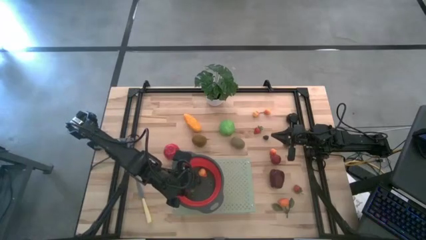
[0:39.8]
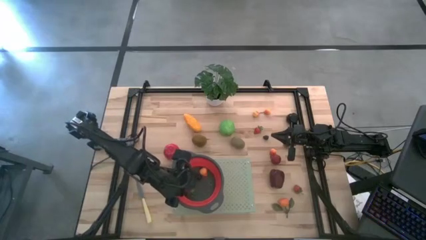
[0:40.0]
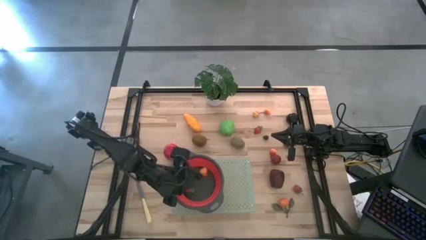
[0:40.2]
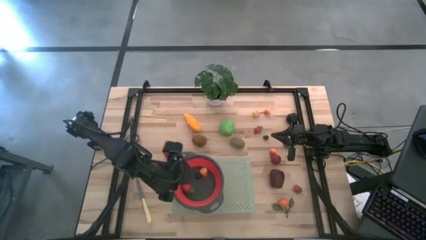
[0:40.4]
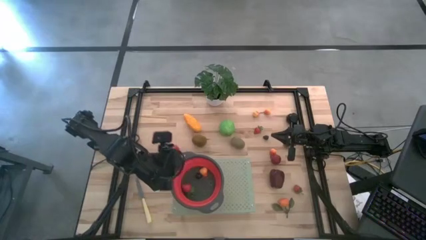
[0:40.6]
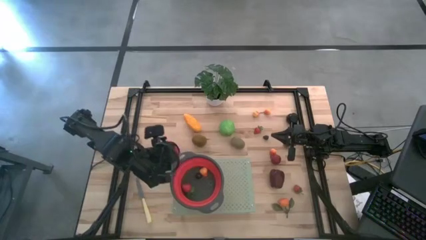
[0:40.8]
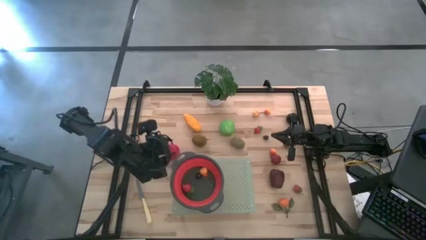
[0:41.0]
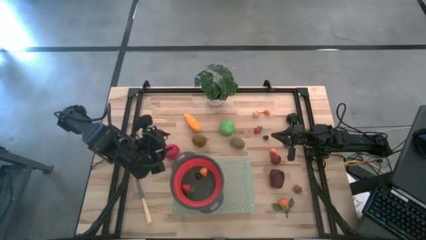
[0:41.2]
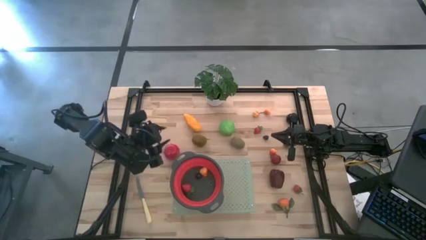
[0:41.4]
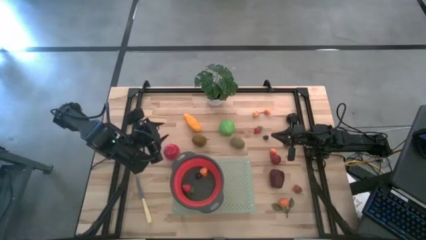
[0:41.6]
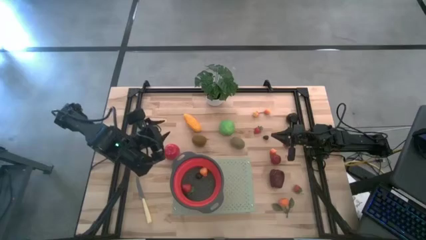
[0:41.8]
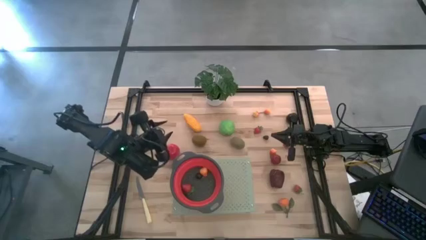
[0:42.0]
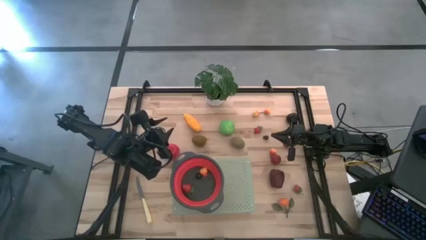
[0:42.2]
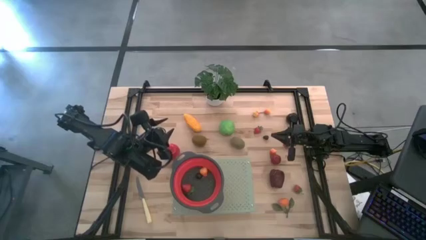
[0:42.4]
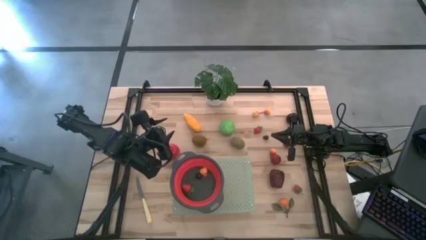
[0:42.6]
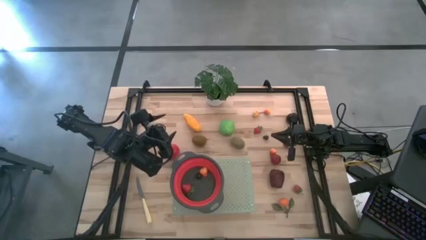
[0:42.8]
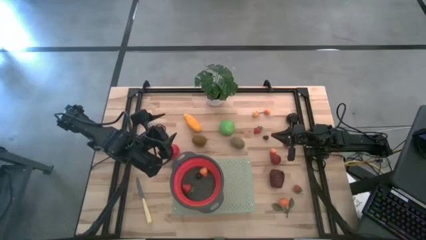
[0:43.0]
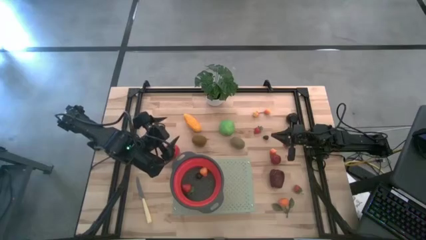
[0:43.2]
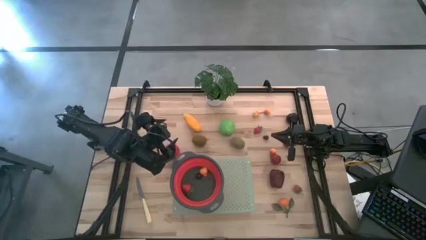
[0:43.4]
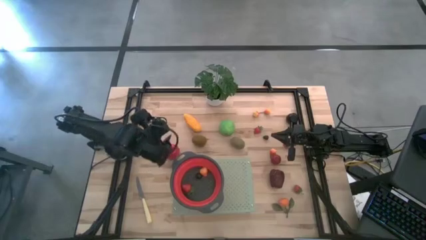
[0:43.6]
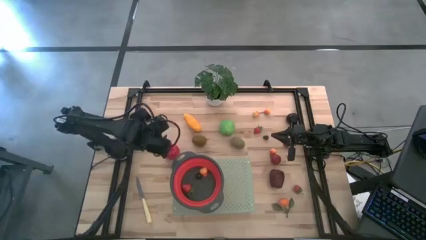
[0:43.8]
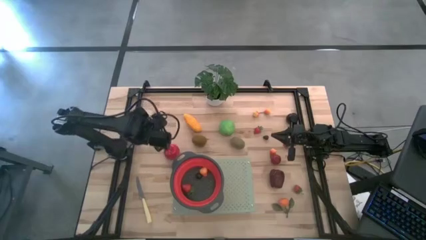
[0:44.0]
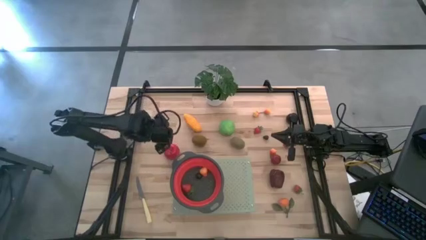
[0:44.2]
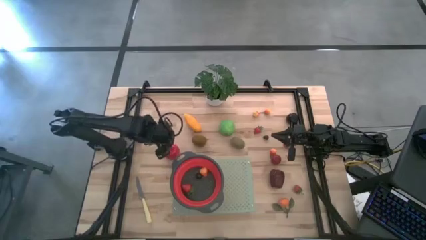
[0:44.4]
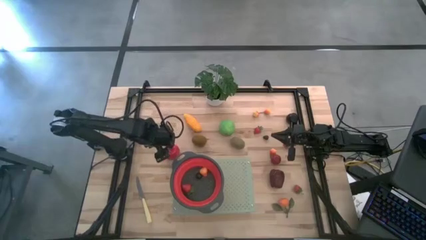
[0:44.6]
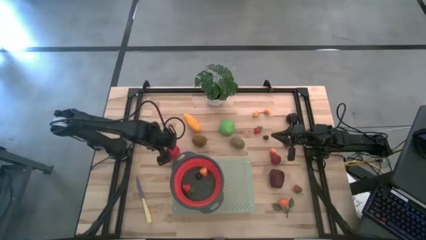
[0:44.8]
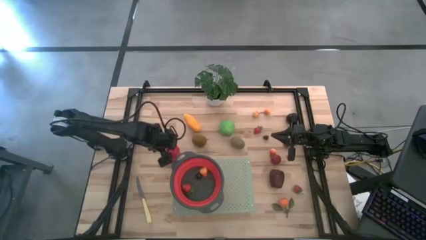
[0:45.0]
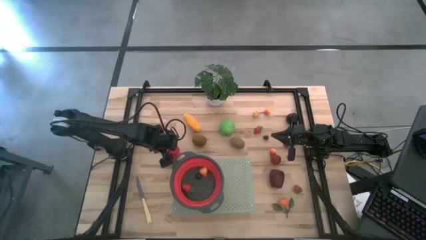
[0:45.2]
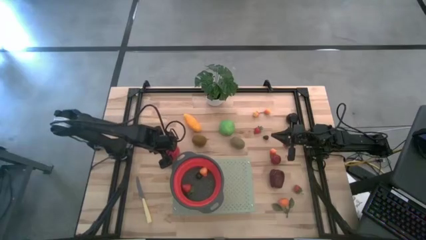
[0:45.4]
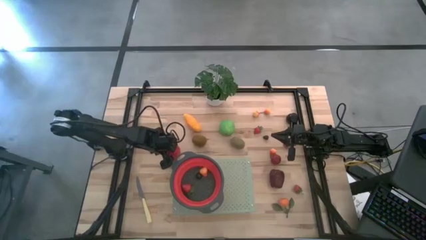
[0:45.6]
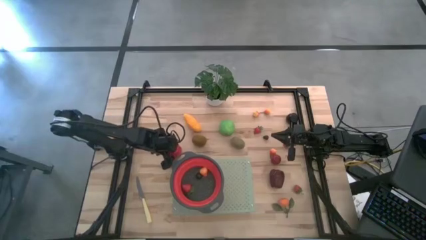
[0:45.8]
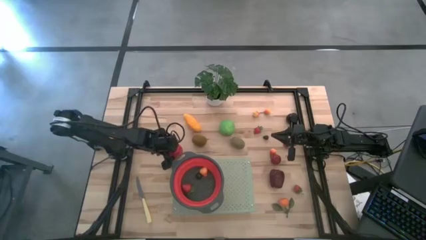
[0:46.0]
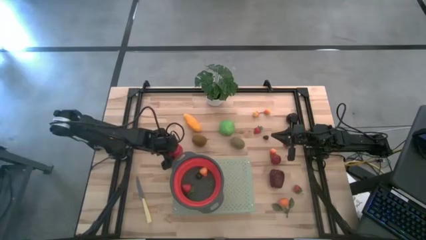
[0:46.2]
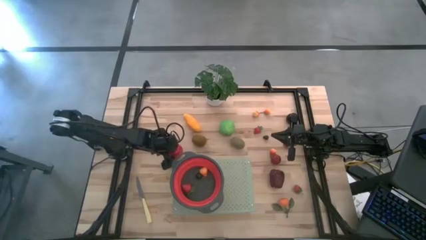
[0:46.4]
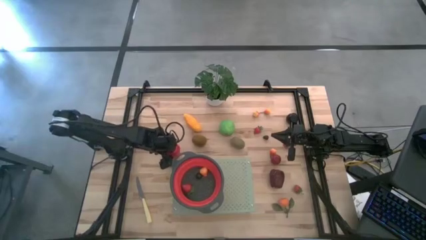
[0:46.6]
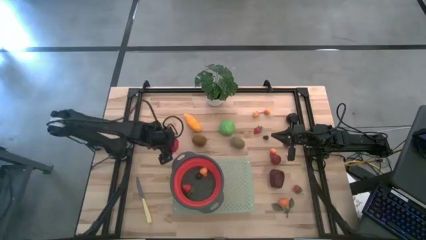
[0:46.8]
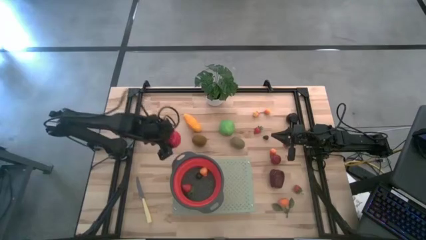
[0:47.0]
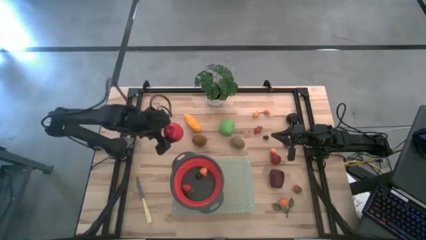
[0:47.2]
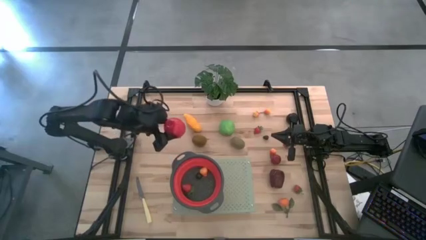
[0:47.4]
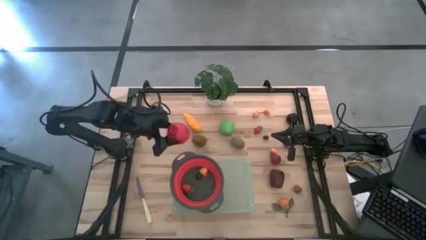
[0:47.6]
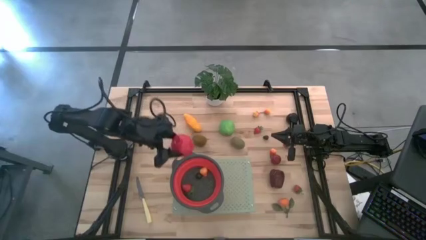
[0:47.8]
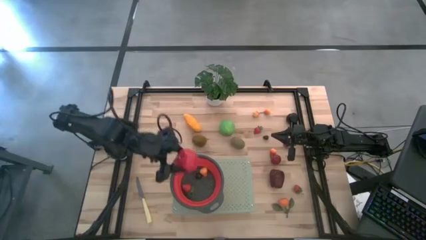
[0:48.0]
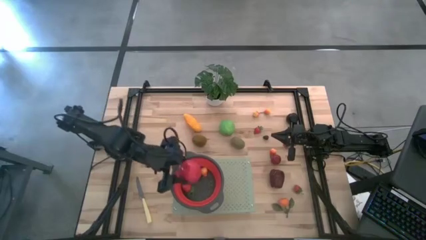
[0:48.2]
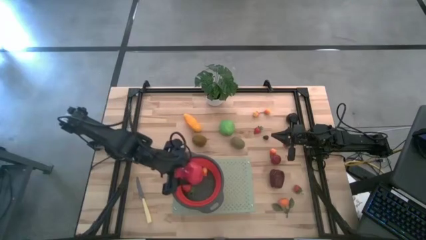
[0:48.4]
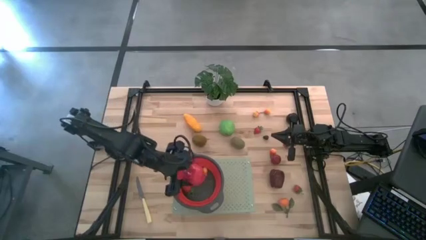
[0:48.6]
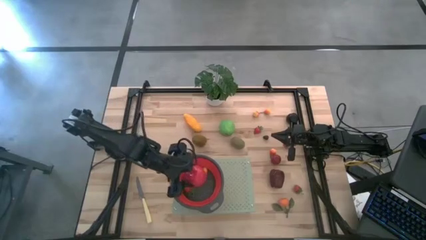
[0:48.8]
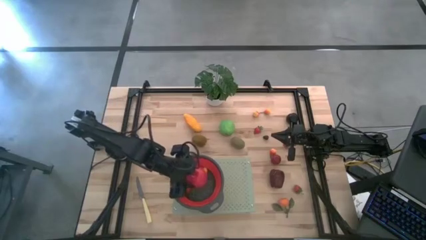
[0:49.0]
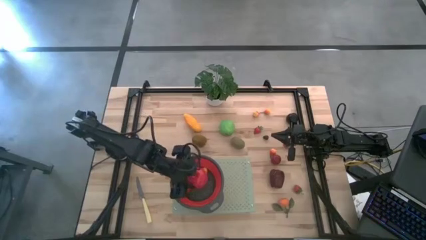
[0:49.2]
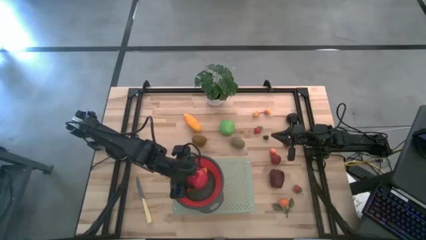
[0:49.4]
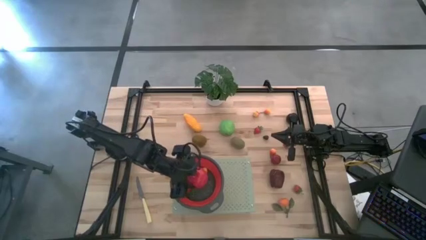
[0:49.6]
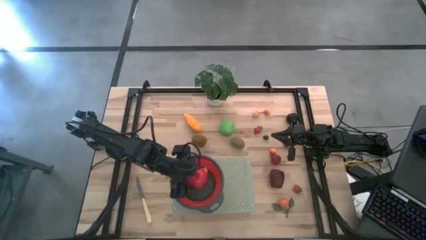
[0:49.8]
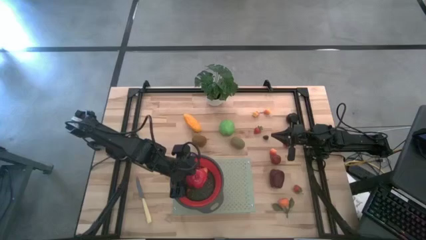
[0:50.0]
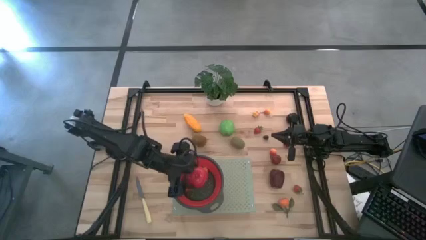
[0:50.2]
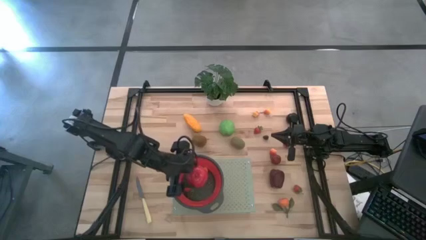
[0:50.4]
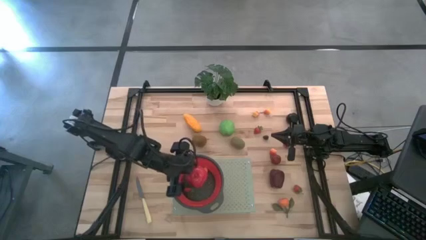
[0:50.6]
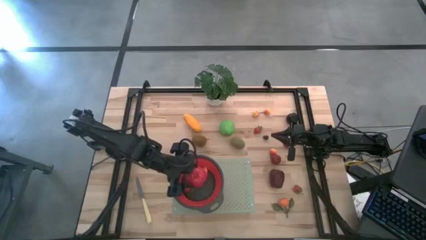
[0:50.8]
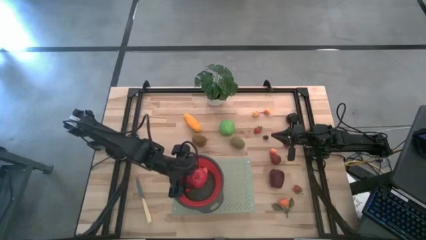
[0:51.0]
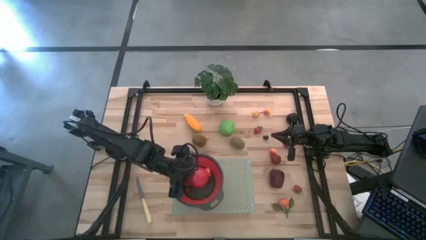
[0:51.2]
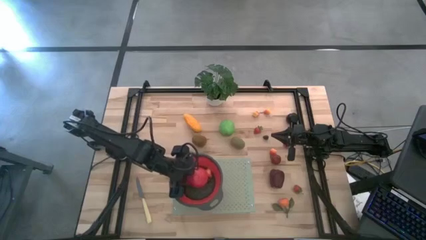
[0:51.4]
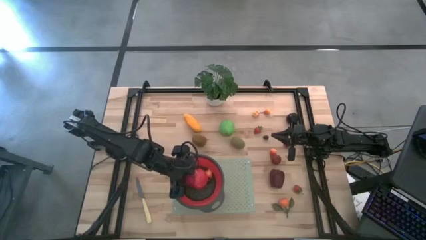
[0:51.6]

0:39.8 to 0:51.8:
Task: Pick & Place Fruit
Put the left red apple into the red strainer

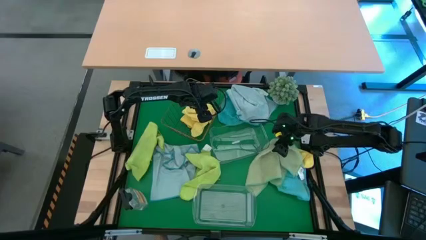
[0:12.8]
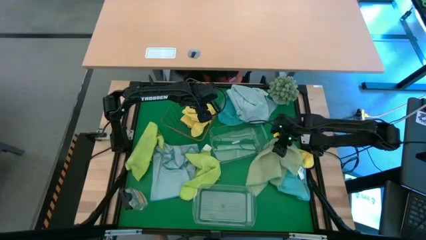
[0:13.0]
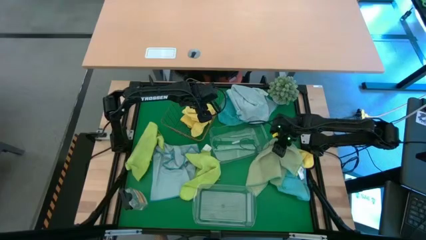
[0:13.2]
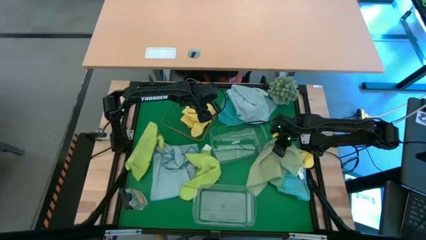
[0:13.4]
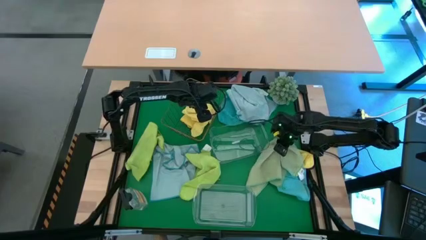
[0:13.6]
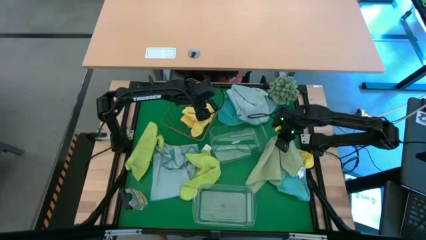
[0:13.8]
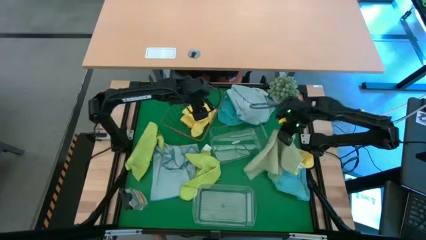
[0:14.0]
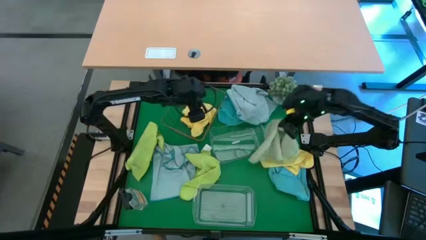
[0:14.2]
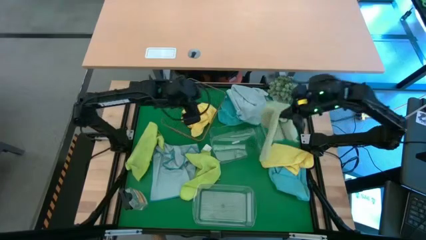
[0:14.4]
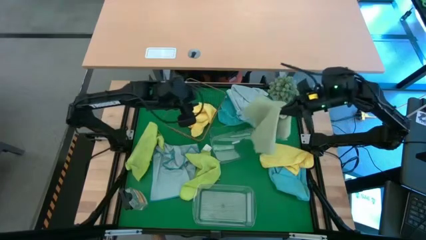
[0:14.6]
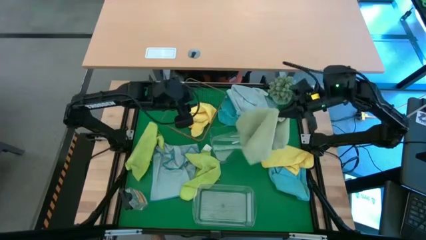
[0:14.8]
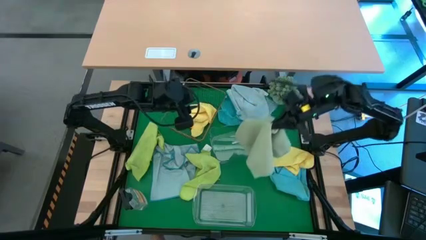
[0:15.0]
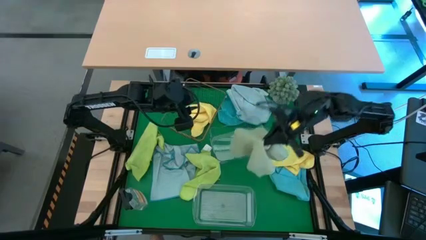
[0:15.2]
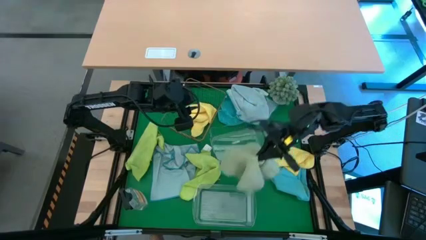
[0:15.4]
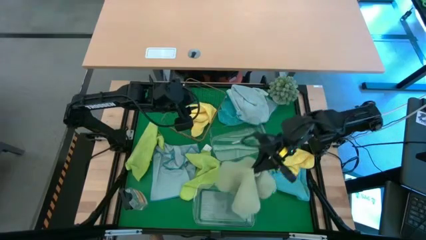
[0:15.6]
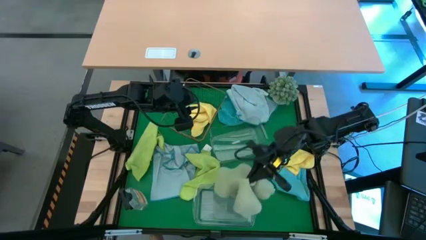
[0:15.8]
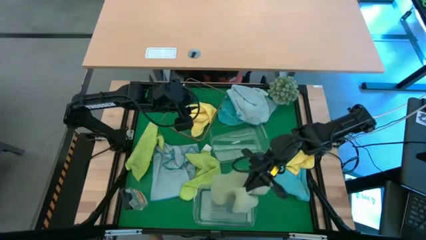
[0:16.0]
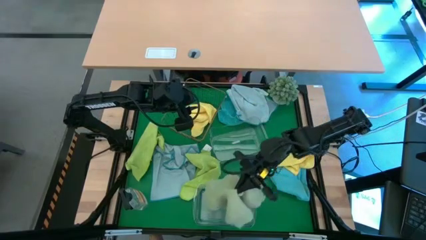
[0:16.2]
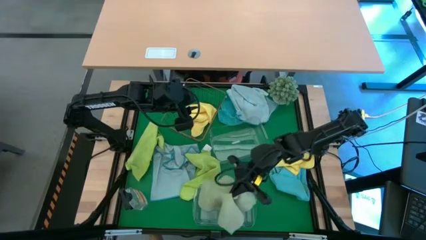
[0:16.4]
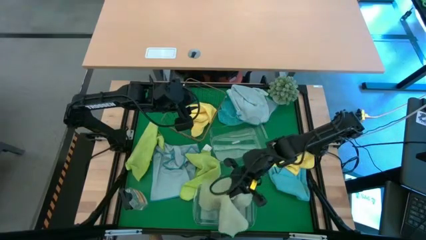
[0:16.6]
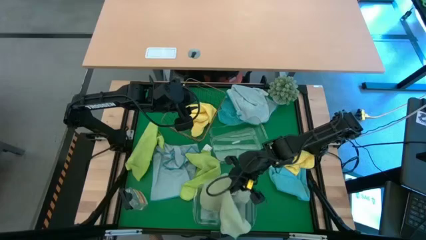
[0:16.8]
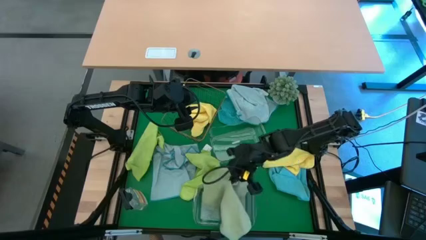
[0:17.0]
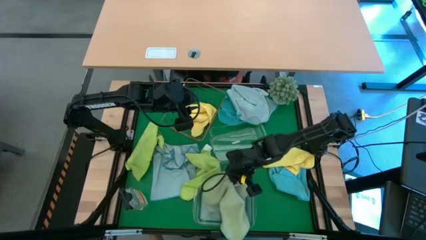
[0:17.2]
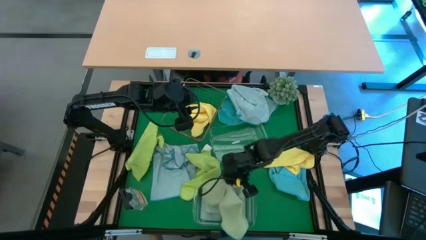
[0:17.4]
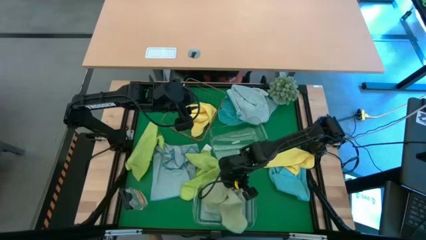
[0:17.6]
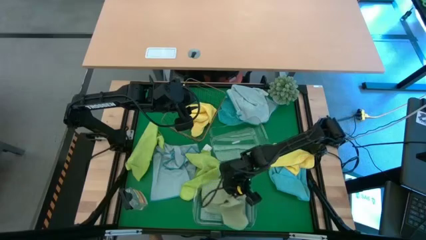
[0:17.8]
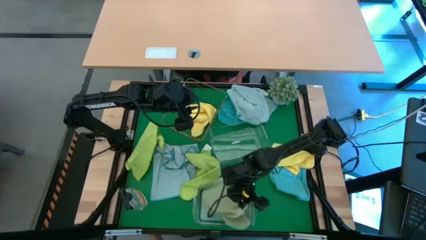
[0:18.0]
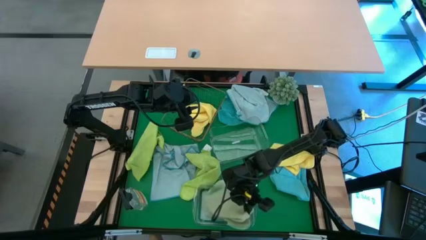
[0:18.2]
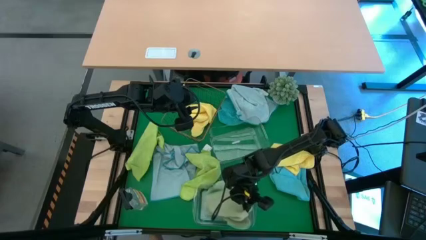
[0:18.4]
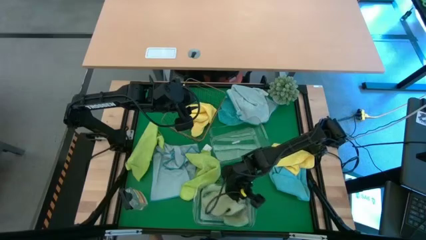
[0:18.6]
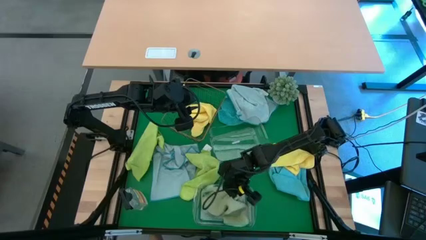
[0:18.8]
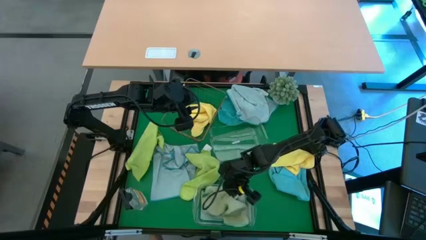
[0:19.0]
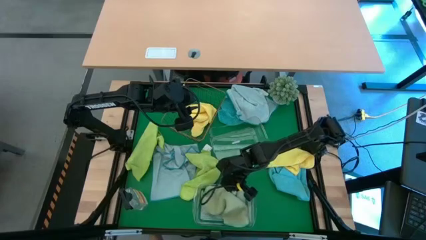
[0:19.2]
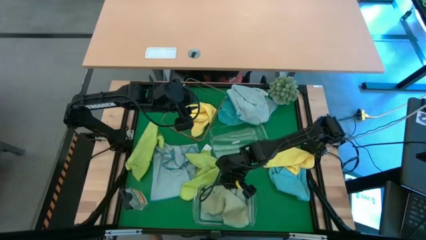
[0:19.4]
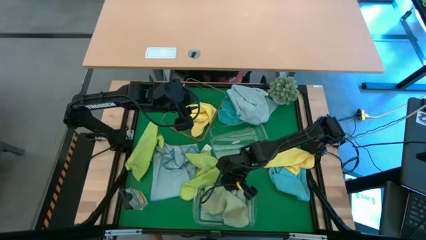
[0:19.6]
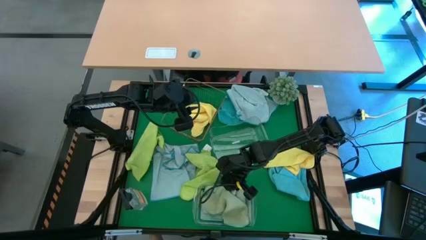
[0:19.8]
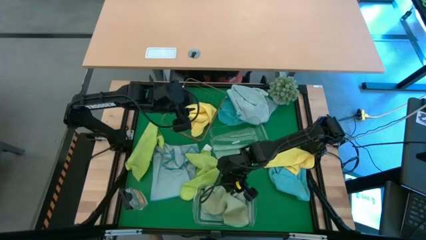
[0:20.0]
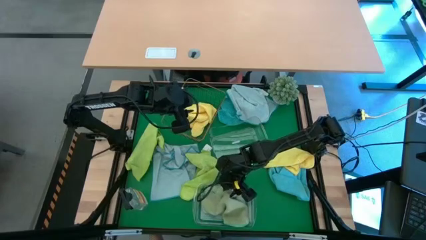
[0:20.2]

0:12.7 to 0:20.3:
Task: Sort microfiber towel by color & place in baskets
Put the green towel into the bottom transparent bin
